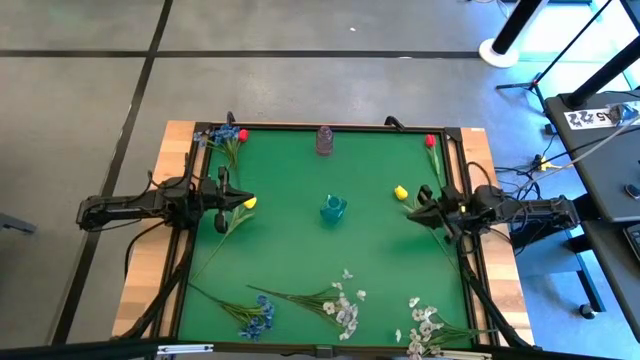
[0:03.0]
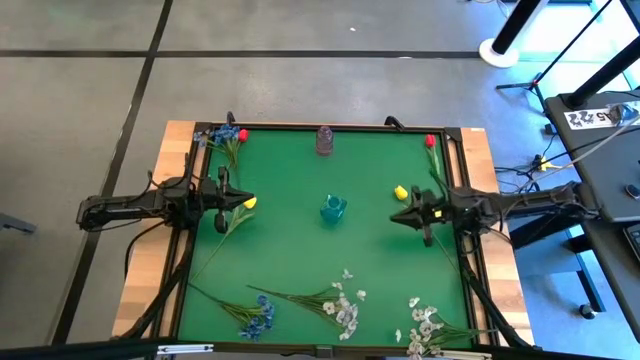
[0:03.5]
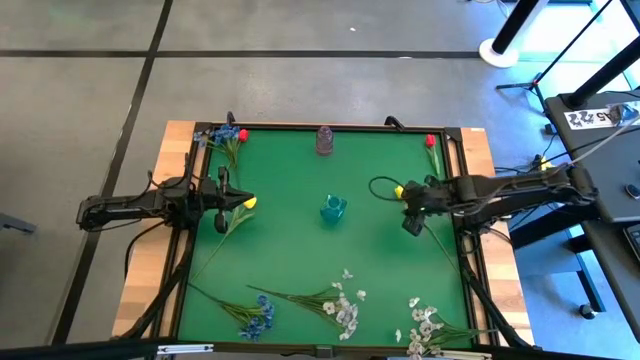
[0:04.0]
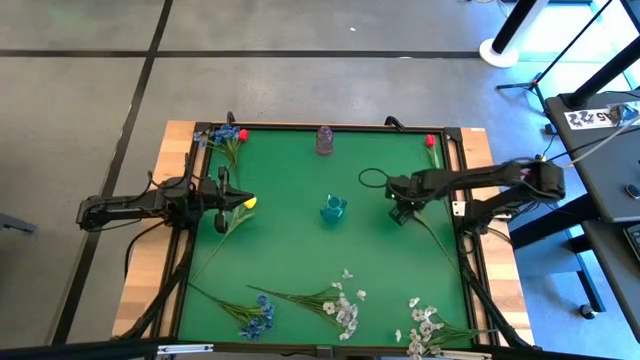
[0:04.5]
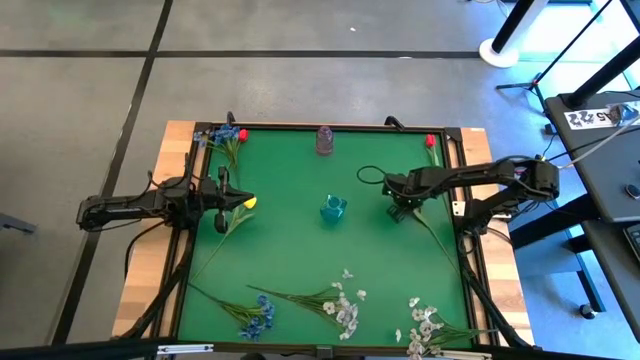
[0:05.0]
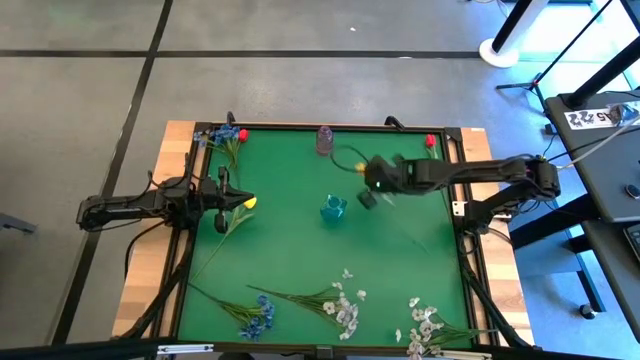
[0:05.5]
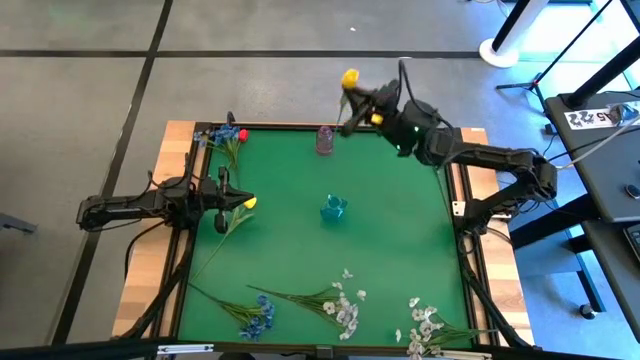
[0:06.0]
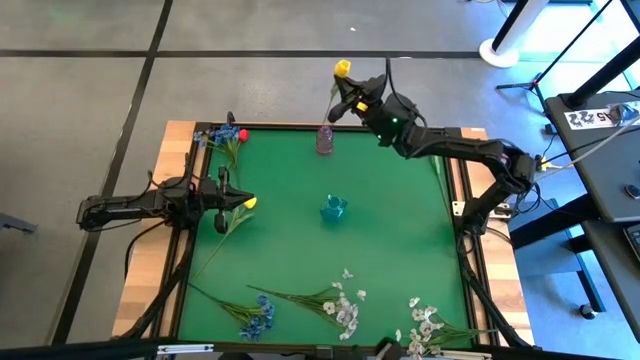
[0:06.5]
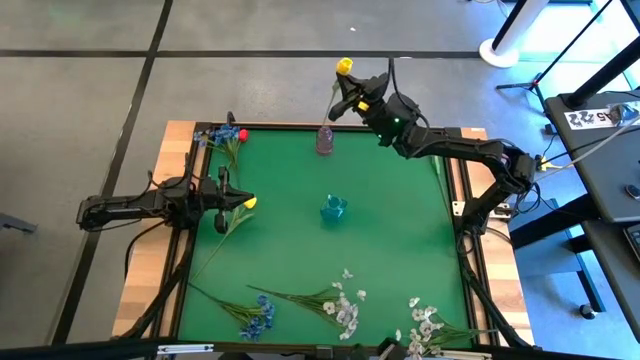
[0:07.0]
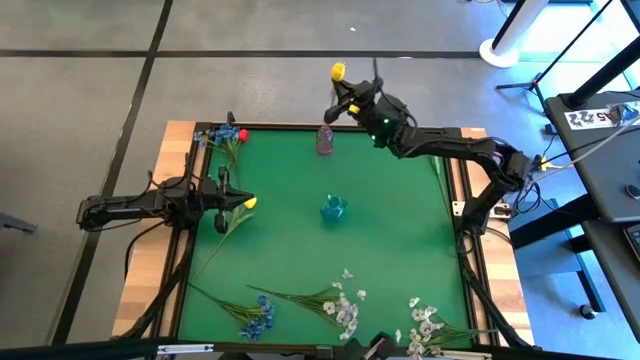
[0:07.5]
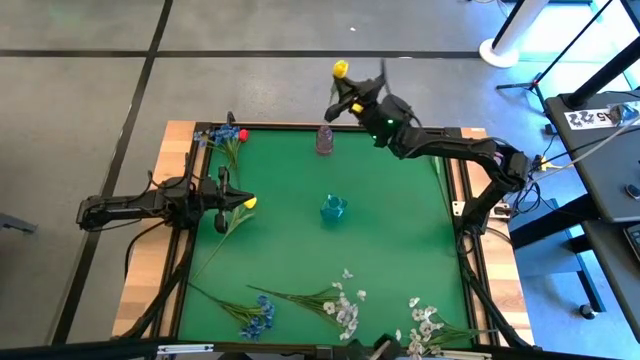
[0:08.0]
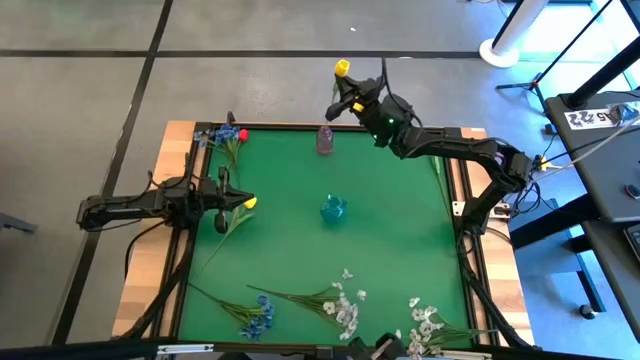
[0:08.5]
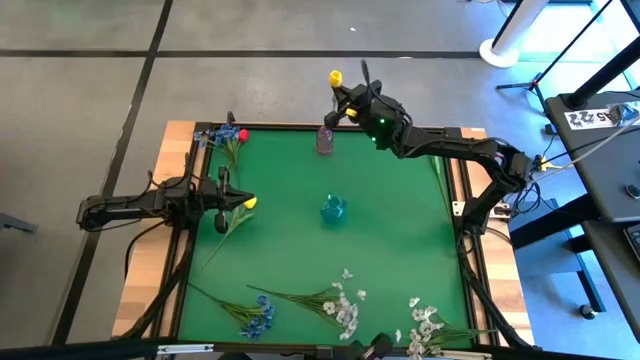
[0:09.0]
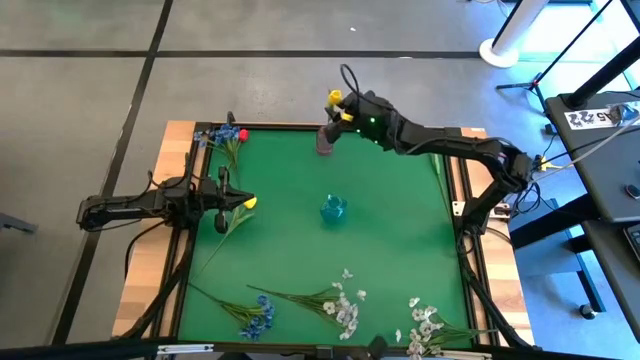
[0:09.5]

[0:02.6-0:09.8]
Task: Sort flowers into vase by color
Put the right yellow tulip into the violet vase

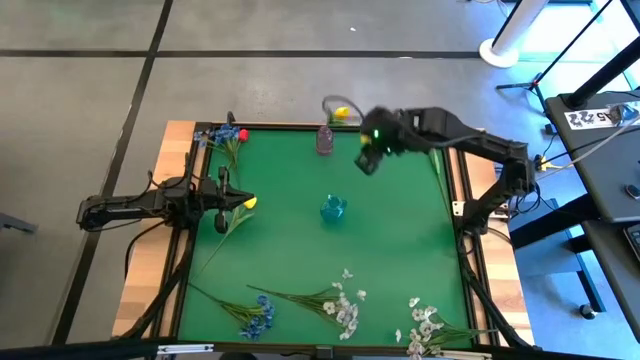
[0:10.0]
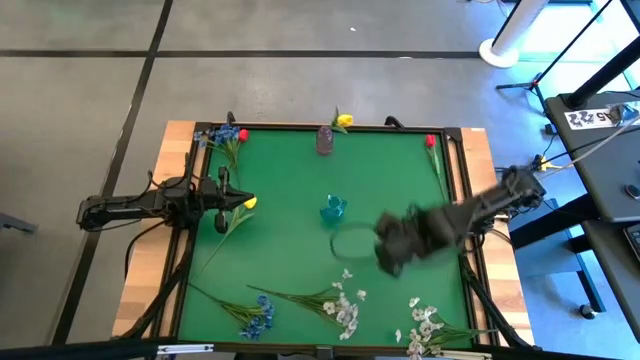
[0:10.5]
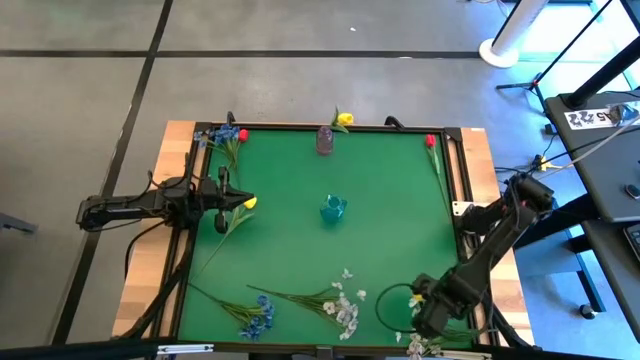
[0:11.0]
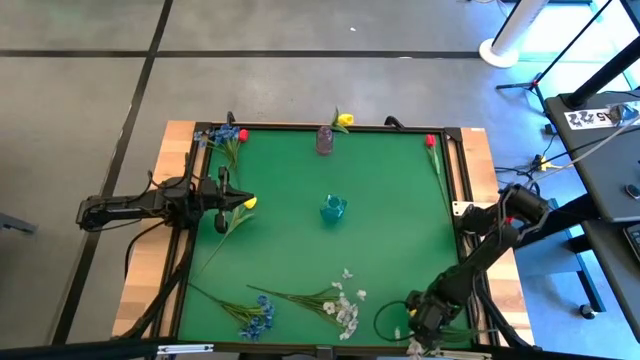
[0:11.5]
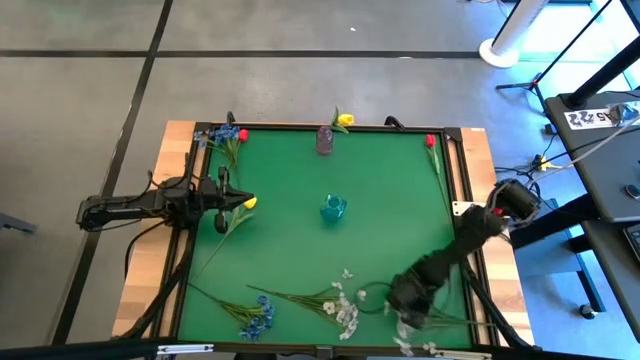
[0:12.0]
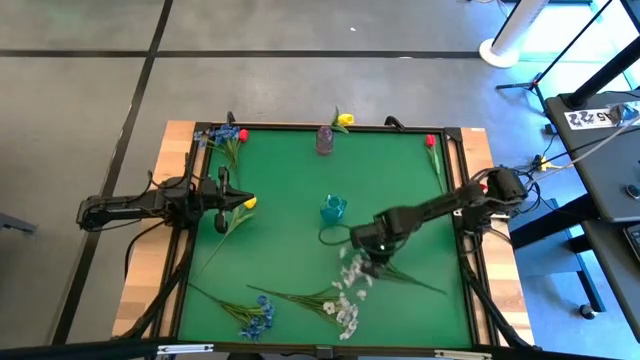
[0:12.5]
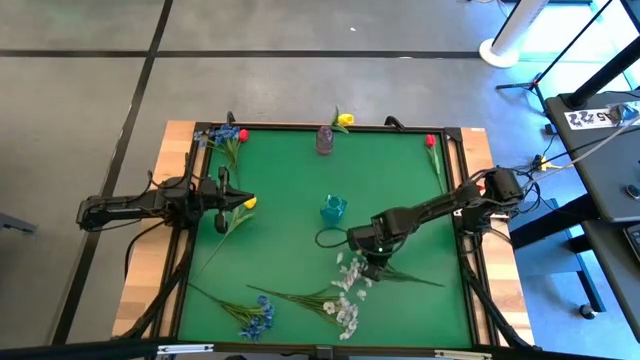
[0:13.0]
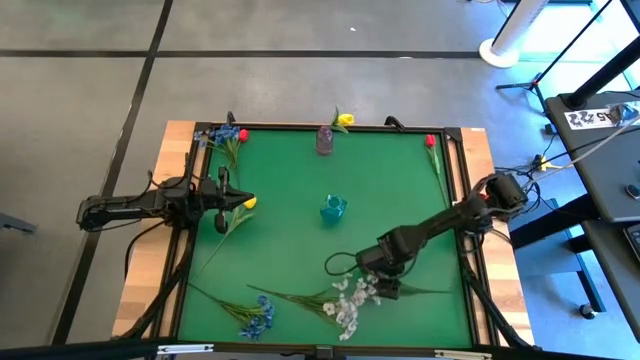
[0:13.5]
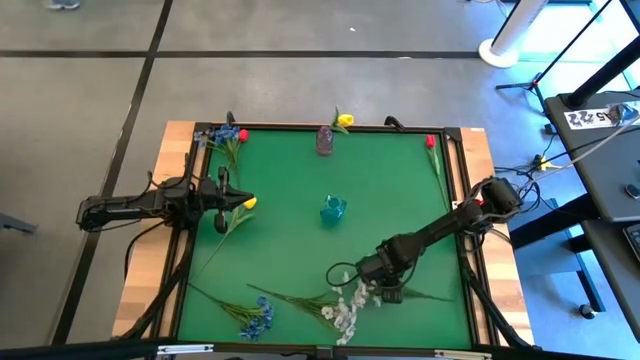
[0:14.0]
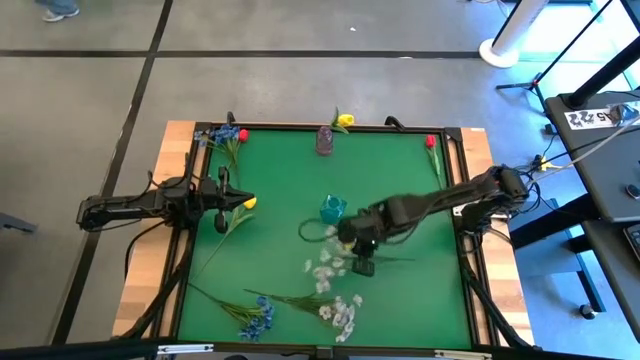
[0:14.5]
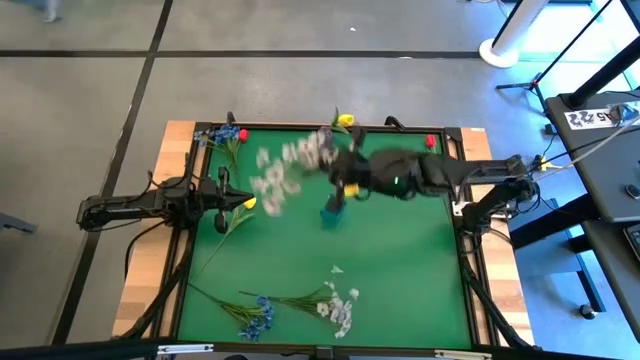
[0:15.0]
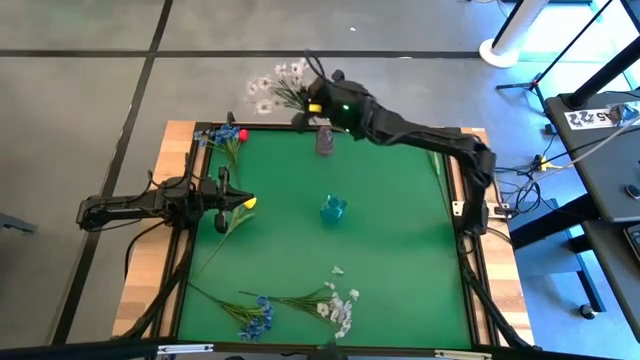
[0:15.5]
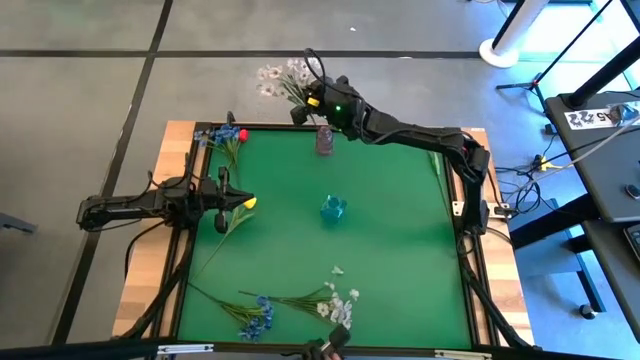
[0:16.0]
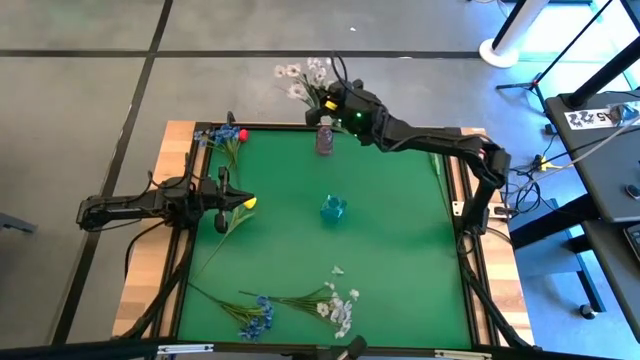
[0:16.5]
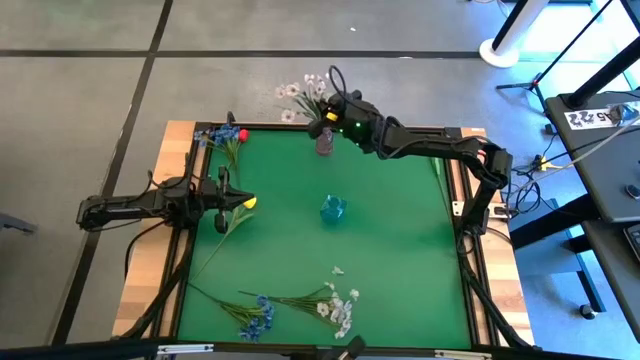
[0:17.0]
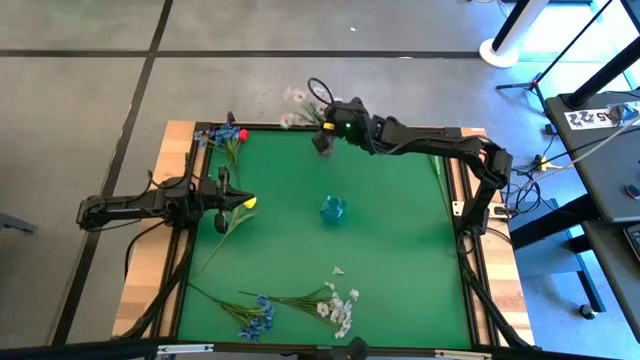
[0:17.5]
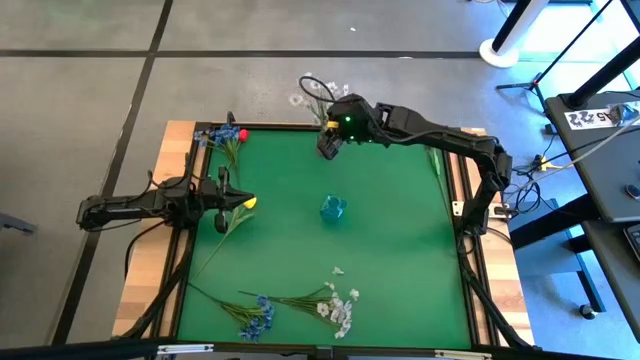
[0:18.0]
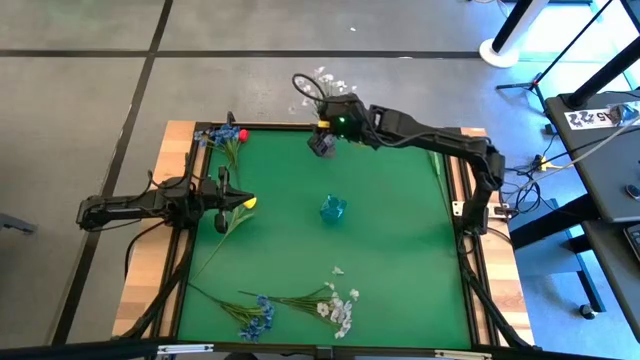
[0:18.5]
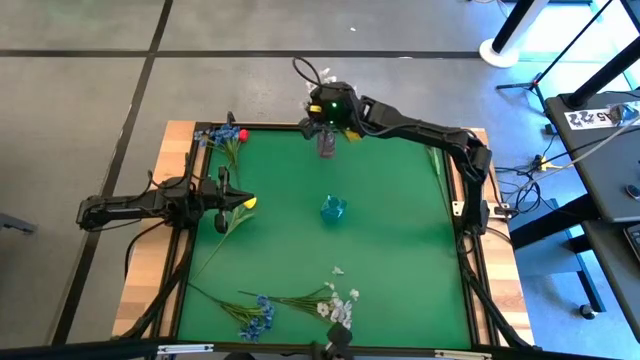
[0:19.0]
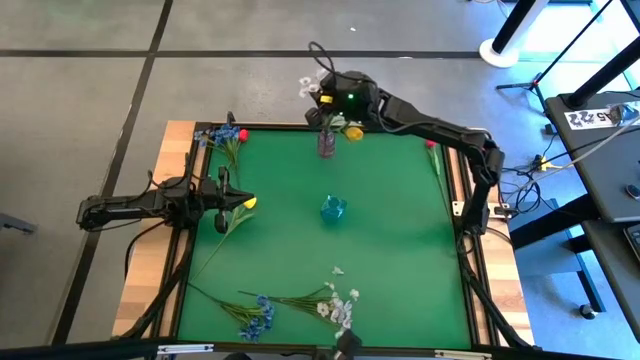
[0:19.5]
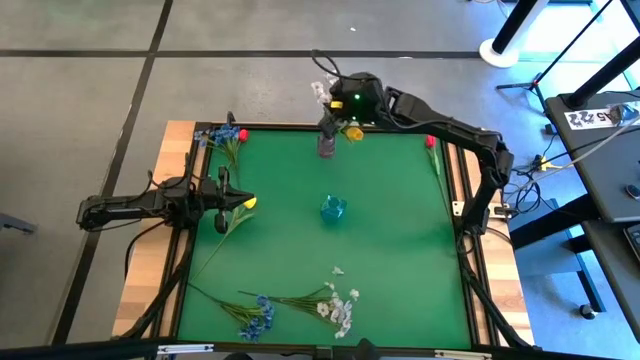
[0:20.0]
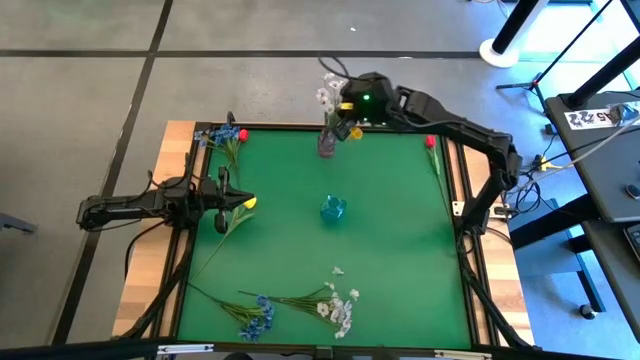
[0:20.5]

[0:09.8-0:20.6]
Put the right white flower into the violet vase

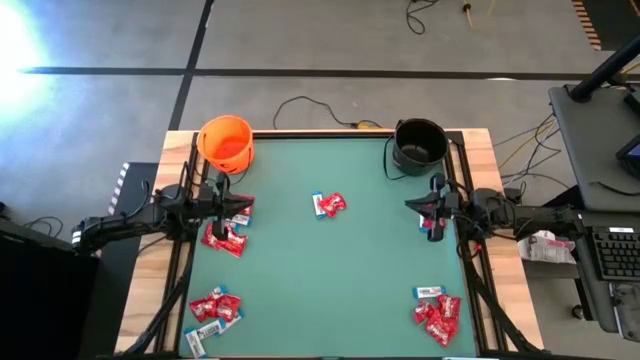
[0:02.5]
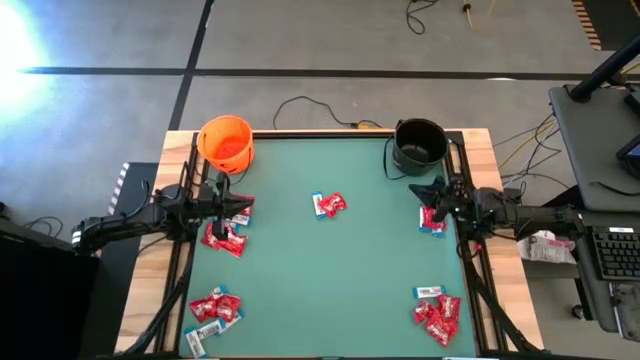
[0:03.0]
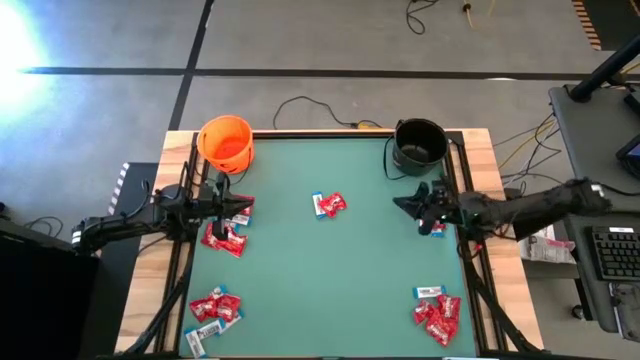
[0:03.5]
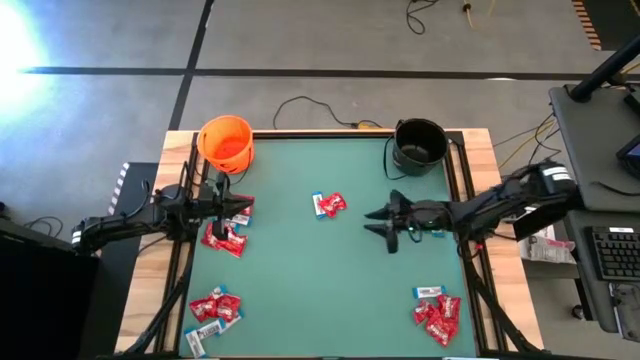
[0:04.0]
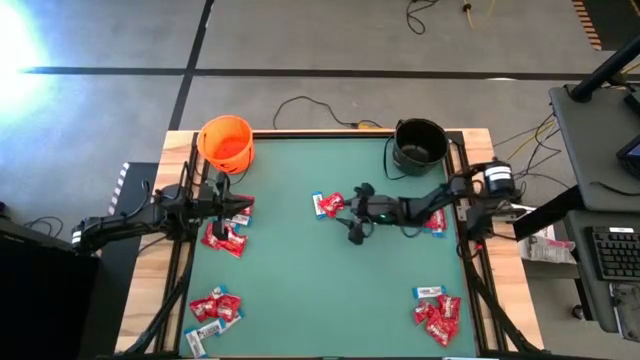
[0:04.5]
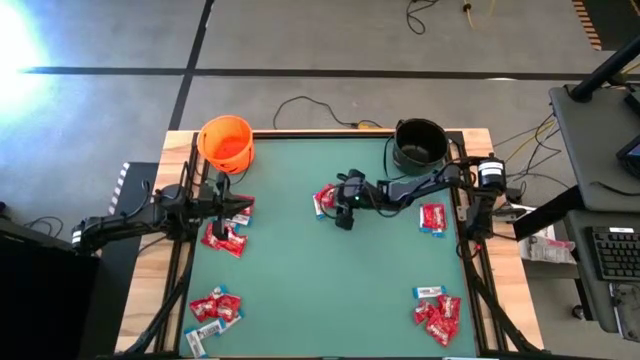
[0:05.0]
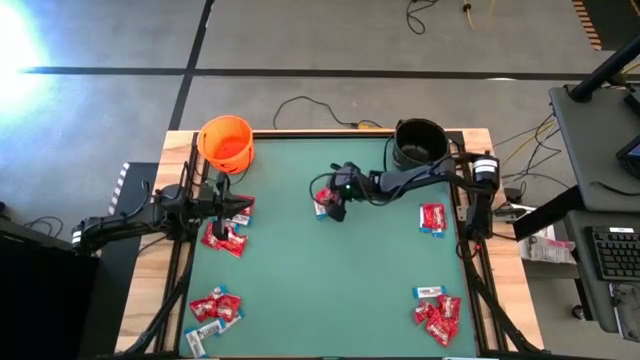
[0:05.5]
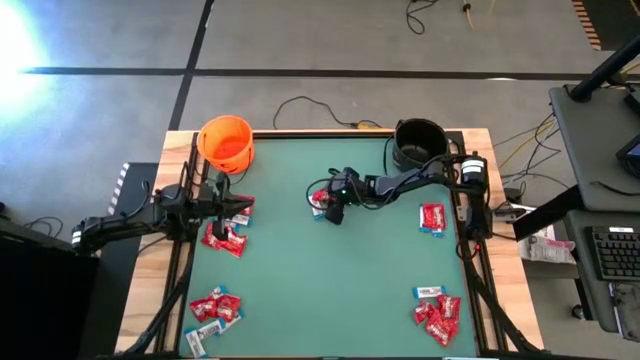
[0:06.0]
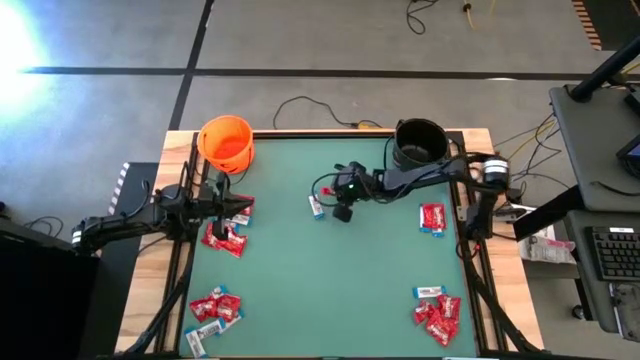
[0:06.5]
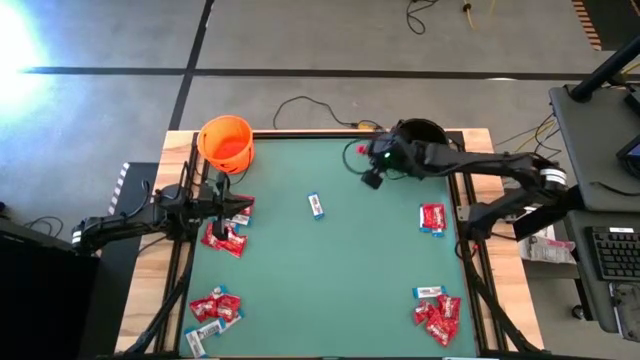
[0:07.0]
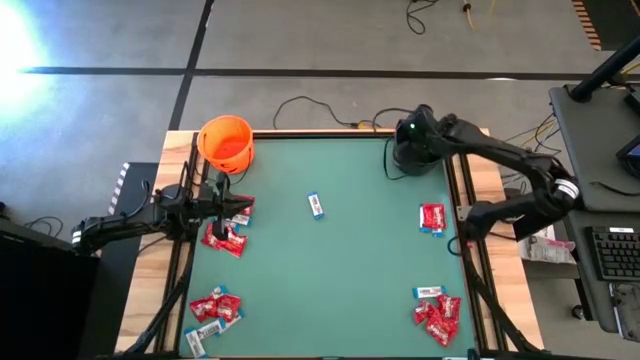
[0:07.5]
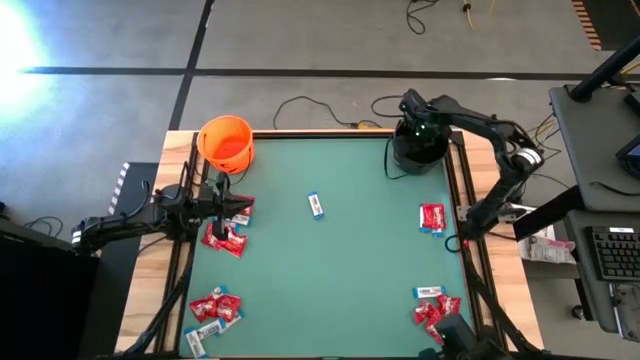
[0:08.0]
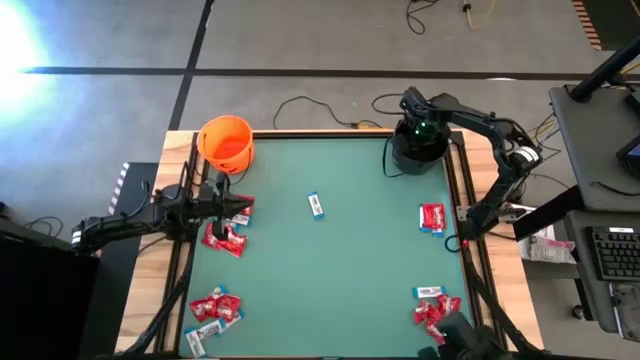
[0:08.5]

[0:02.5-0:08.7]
Task: Sort candy by brand, put in halloween buckets
Put the red candy into the black bucket
